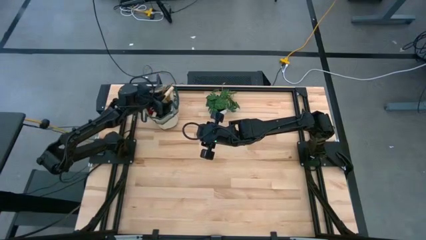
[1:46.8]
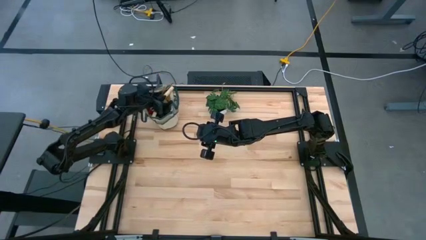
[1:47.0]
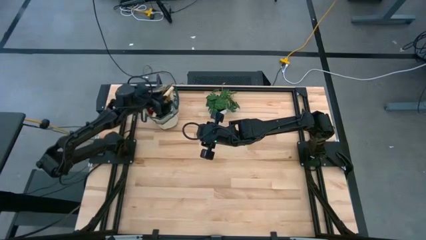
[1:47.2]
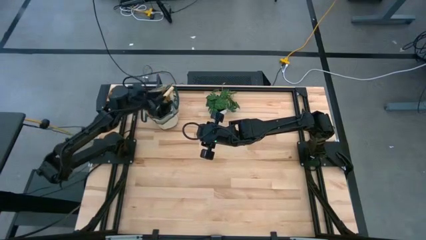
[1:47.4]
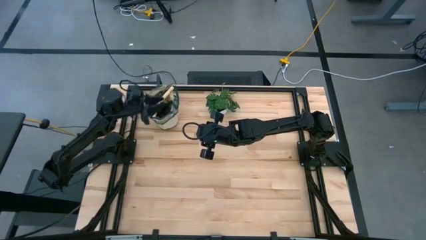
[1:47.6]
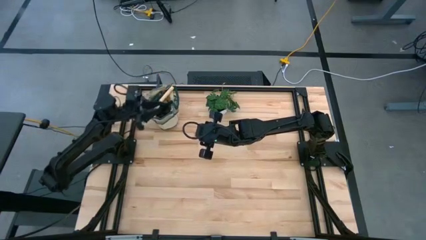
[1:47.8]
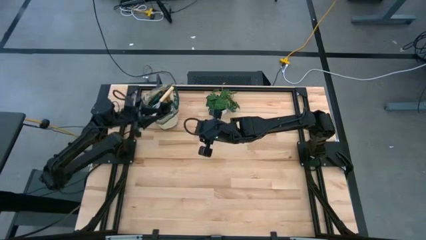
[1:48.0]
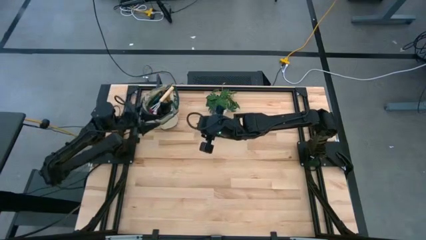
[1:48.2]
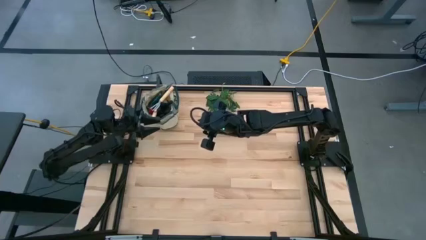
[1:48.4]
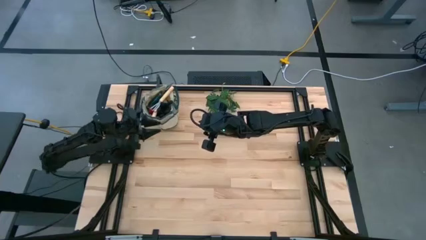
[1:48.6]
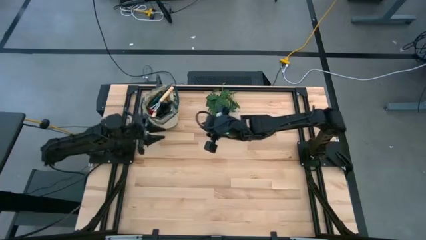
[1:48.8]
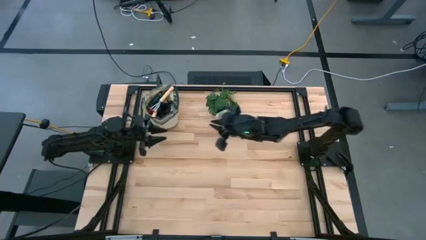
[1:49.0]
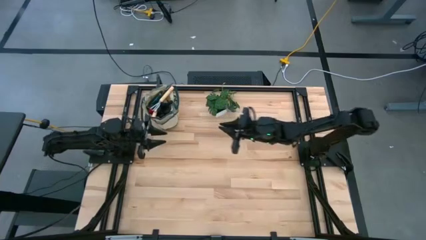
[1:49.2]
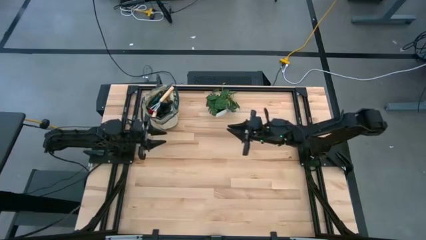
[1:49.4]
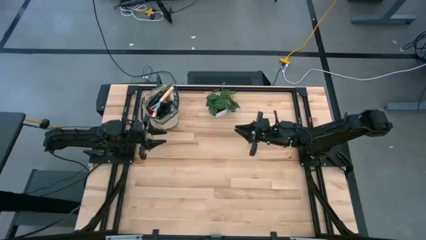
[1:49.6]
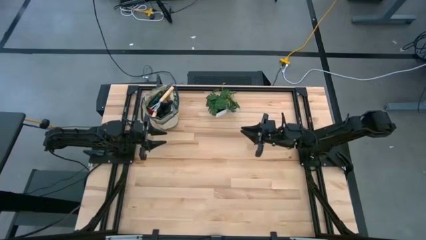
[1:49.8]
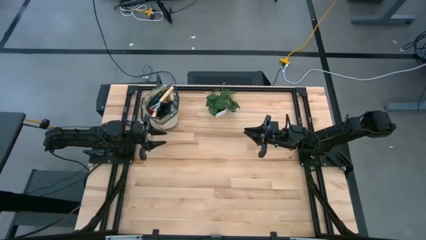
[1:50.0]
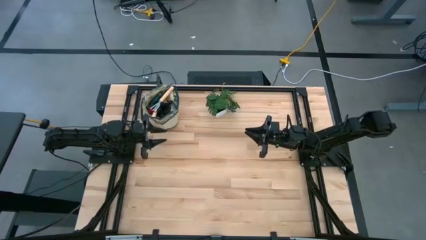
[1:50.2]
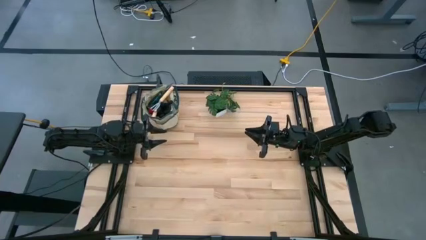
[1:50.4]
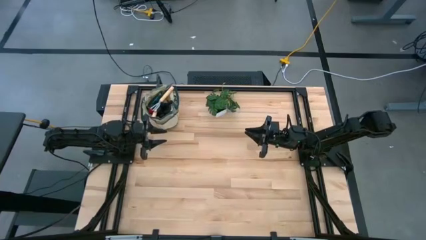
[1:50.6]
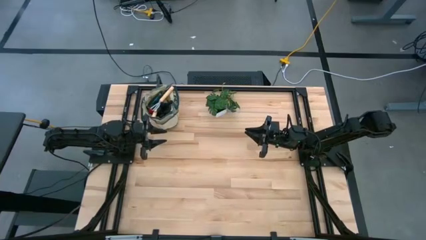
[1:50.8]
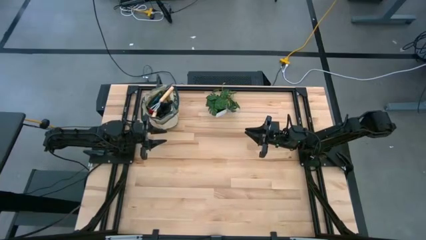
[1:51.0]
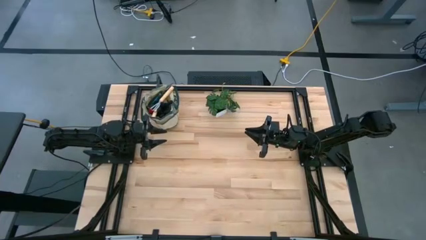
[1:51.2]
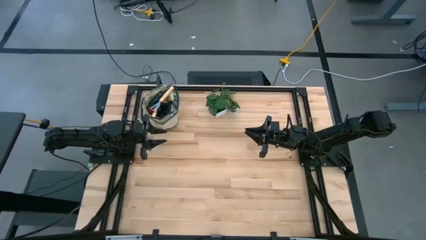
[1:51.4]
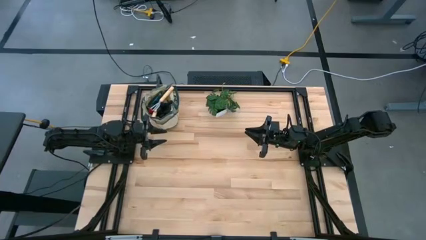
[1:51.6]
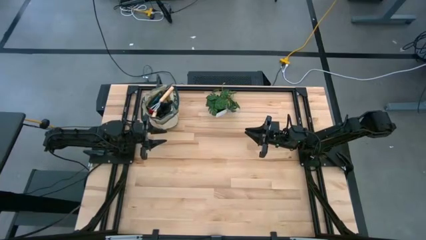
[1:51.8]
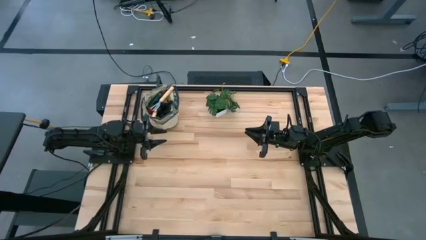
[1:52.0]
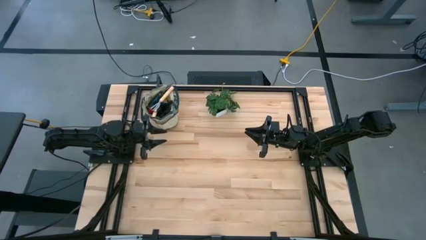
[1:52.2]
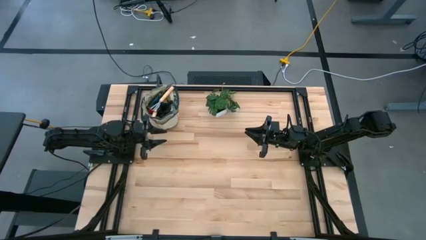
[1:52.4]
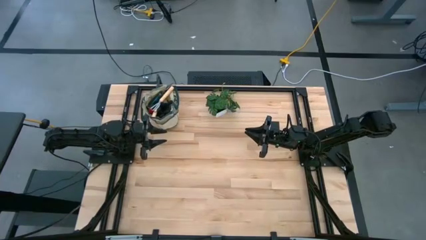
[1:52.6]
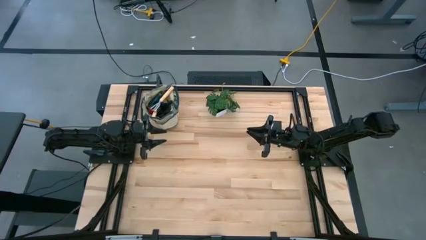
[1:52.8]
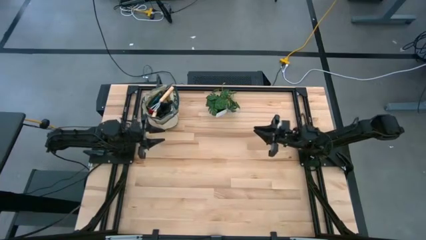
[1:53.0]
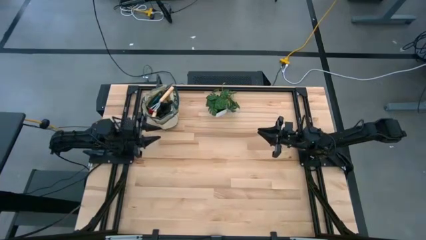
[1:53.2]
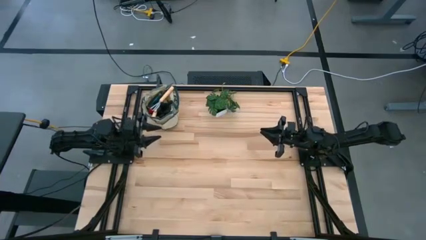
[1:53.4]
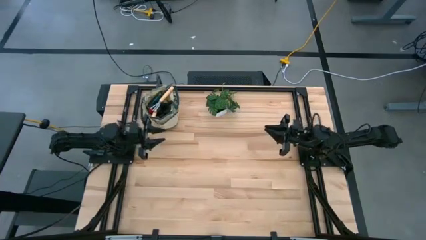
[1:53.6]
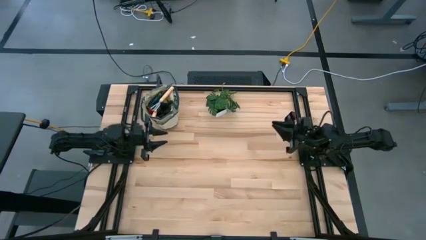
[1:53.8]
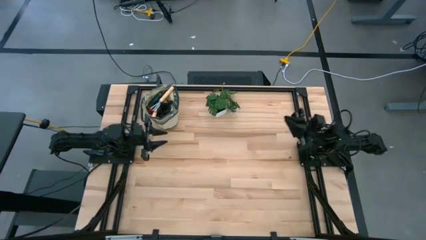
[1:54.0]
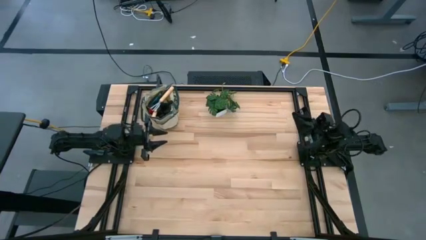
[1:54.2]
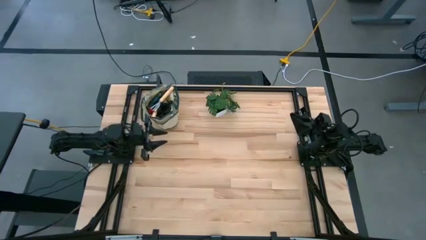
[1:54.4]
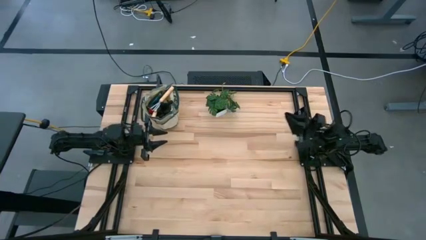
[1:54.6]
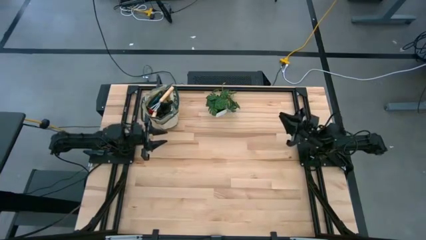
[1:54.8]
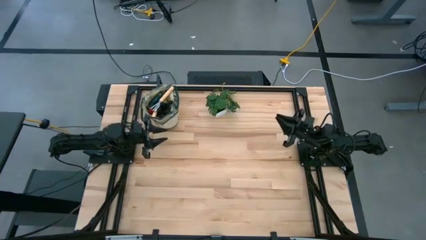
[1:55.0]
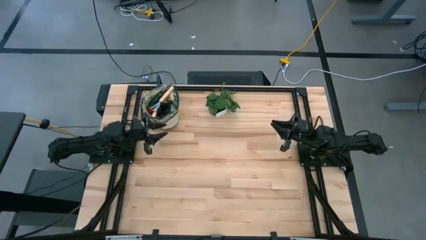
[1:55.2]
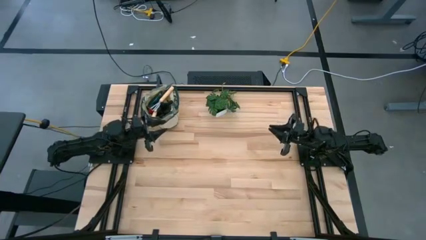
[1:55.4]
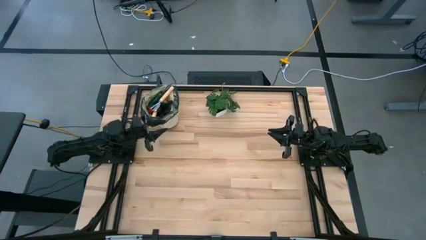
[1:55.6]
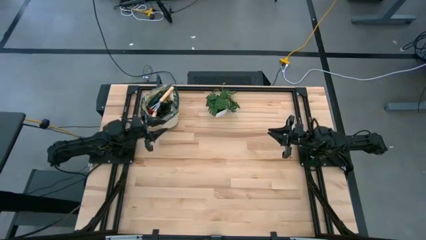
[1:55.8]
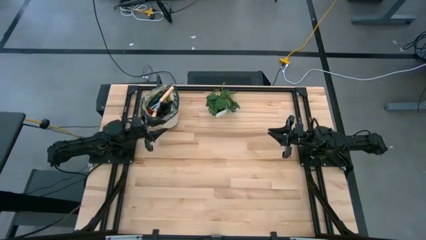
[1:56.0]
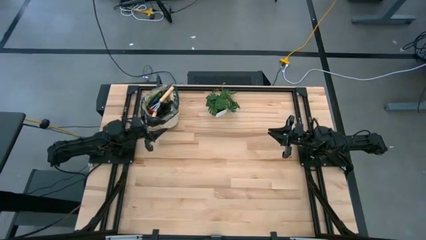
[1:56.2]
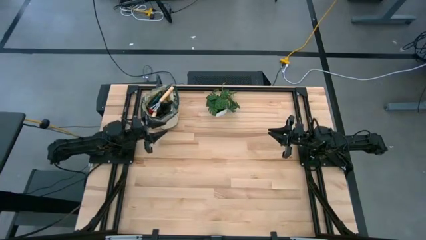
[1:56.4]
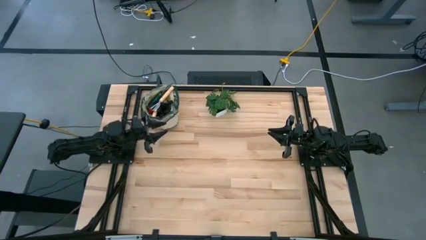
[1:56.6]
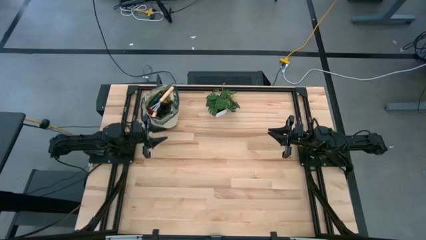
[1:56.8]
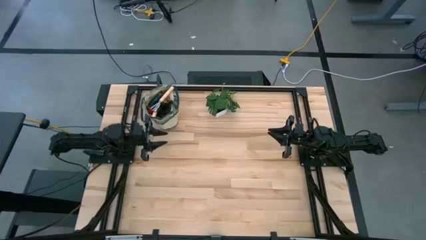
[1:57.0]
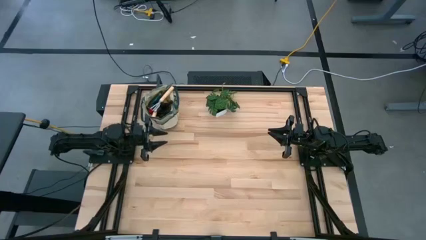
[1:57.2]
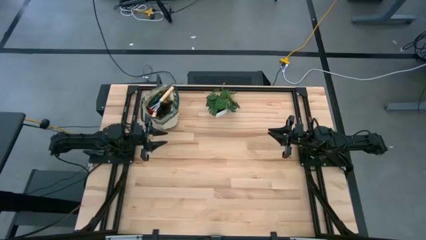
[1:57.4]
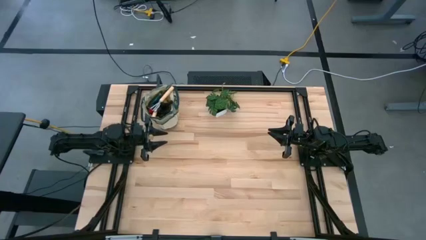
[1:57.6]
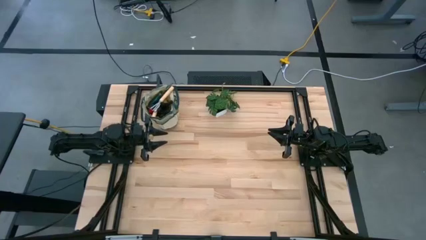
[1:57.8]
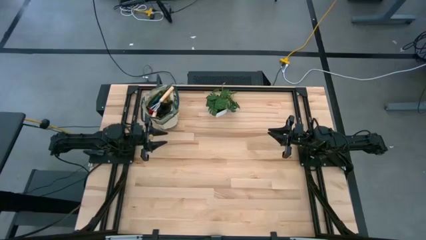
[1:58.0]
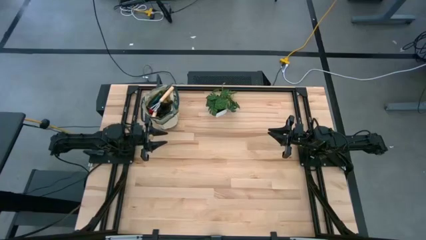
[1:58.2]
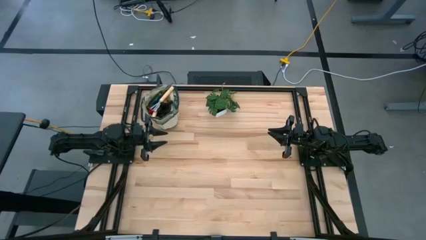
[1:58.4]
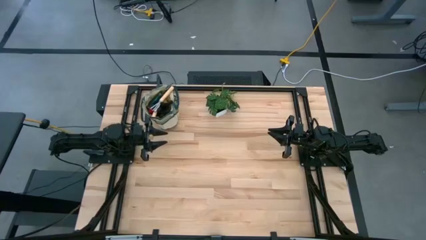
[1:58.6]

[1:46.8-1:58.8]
Task: Pick & Place Garden tools in Gardening bag
Return to Home Position

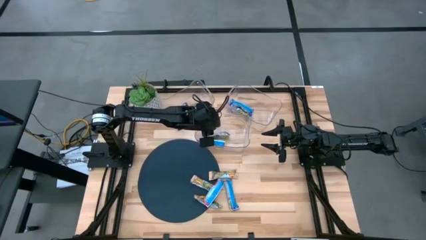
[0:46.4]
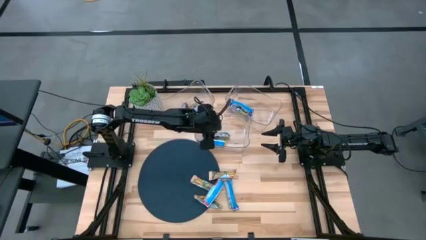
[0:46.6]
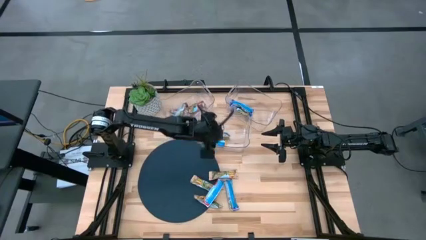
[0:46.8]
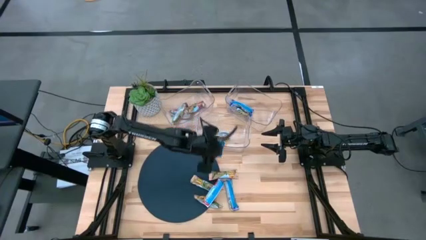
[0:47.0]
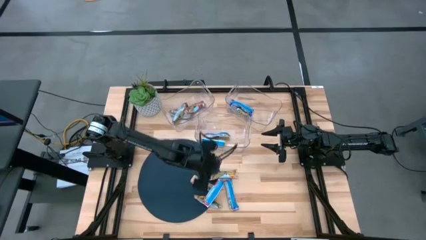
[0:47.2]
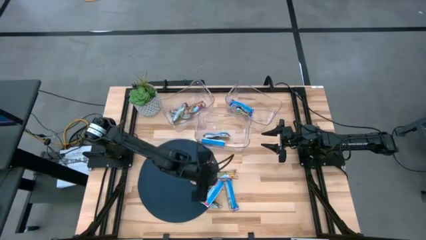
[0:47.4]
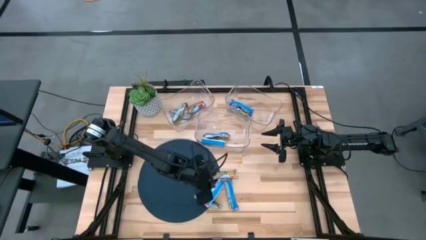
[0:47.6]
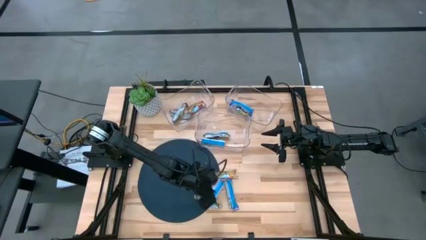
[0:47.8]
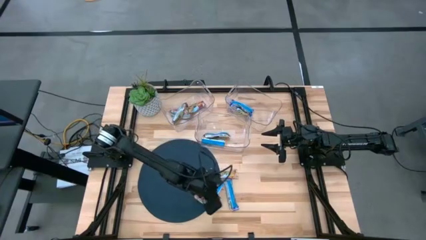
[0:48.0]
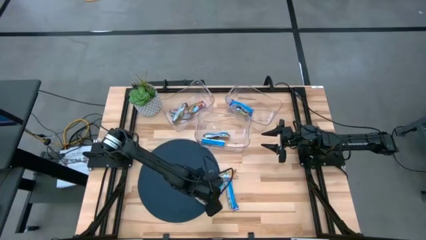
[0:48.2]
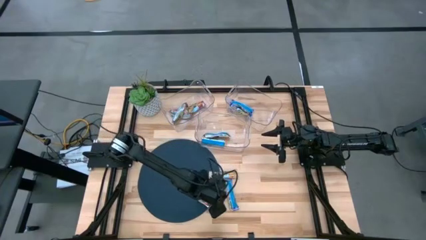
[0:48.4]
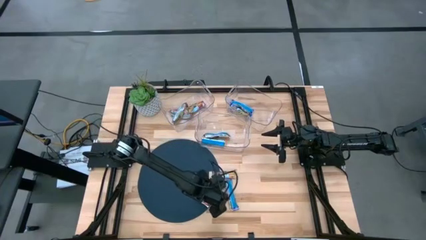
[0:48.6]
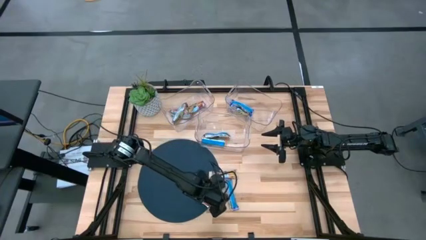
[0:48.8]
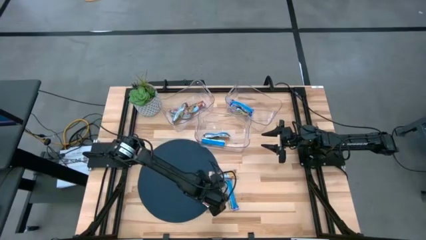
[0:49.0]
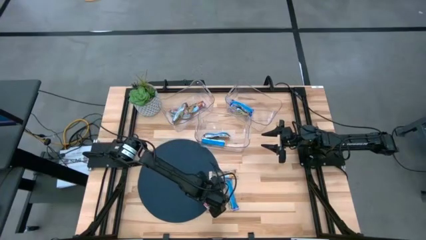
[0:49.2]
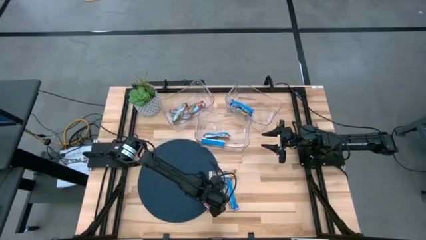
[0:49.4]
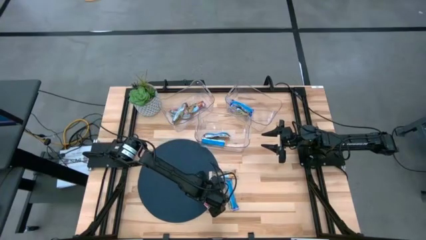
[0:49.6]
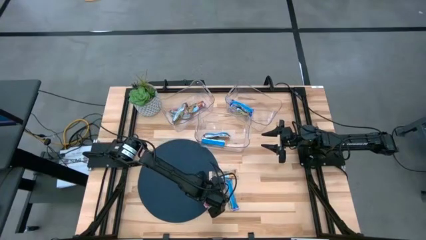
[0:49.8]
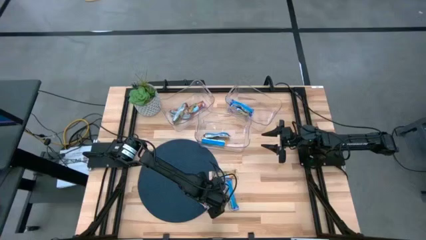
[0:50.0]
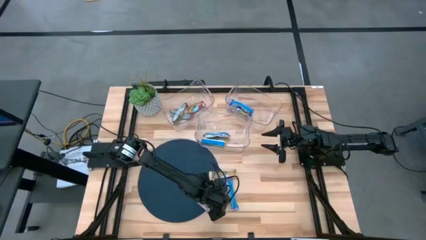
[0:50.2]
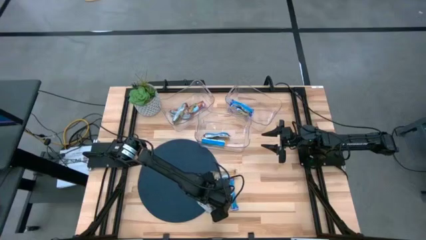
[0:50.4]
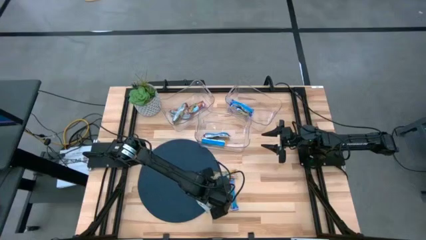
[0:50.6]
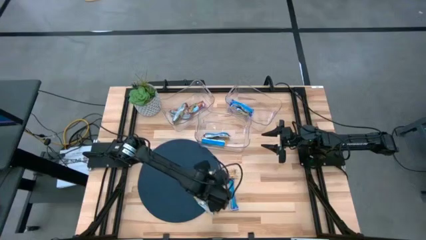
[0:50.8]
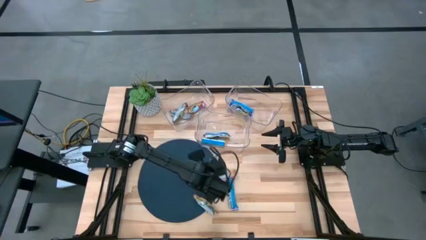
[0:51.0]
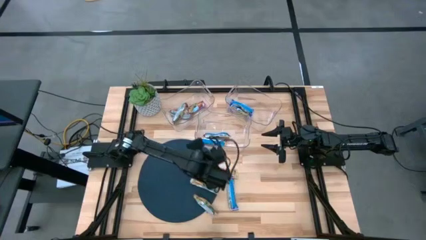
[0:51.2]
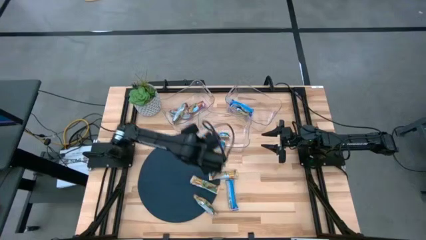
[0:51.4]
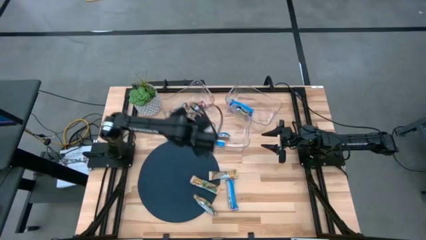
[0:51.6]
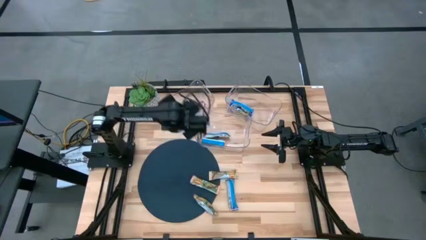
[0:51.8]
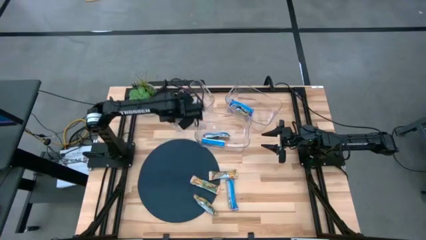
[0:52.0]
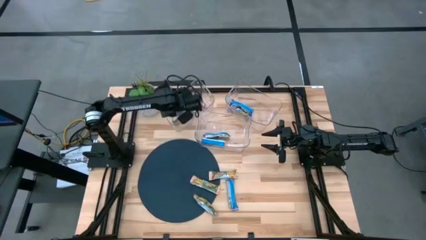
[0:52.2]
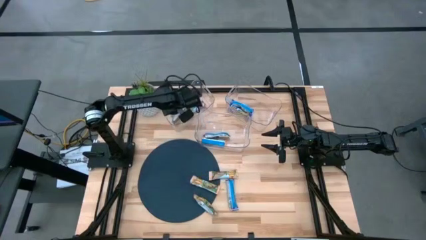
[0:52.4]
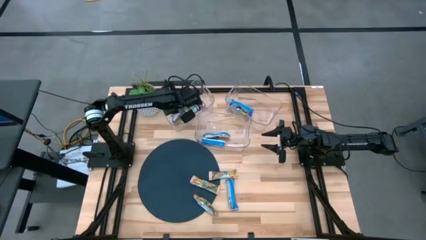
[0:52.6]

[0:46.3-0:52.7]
Task: Pick and place Granola Bars by type
Put the red granola bar into the left transparent bin
